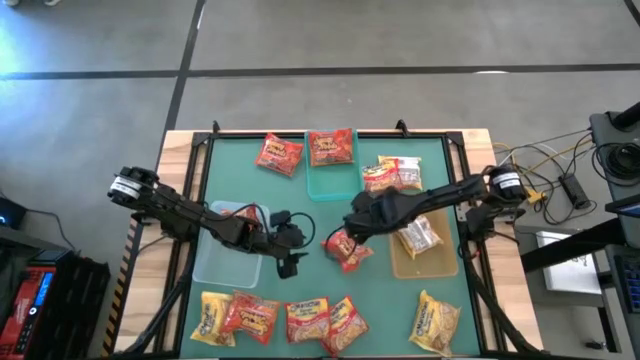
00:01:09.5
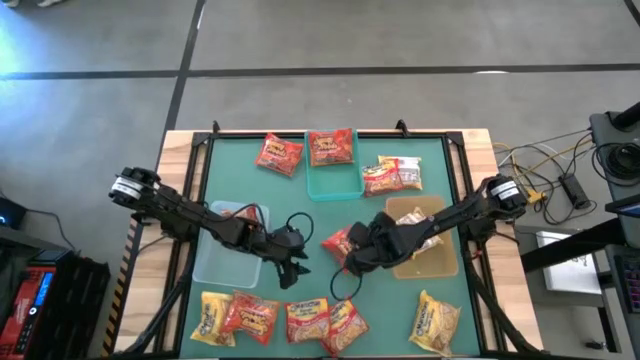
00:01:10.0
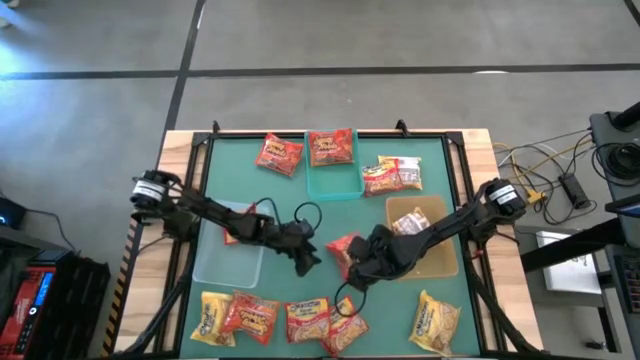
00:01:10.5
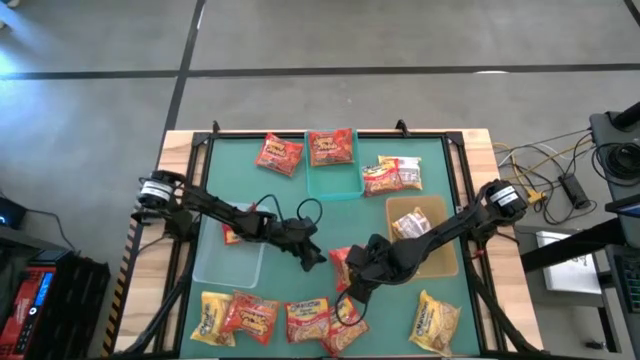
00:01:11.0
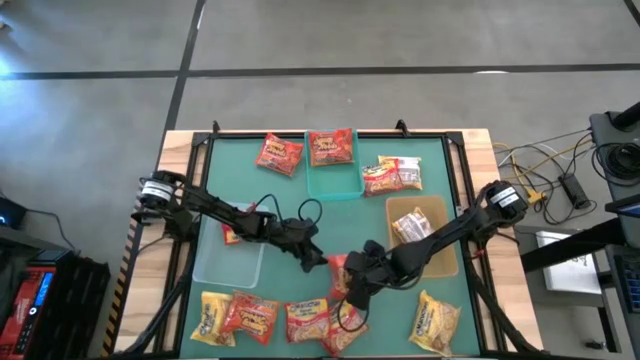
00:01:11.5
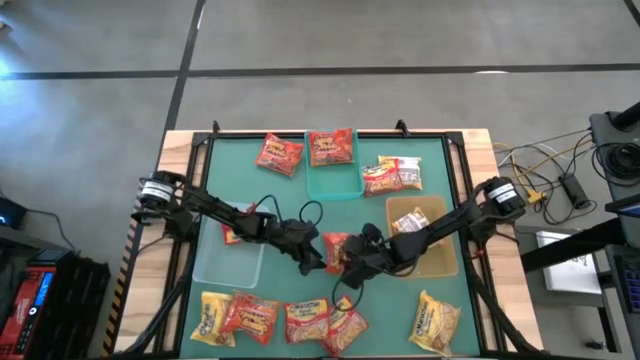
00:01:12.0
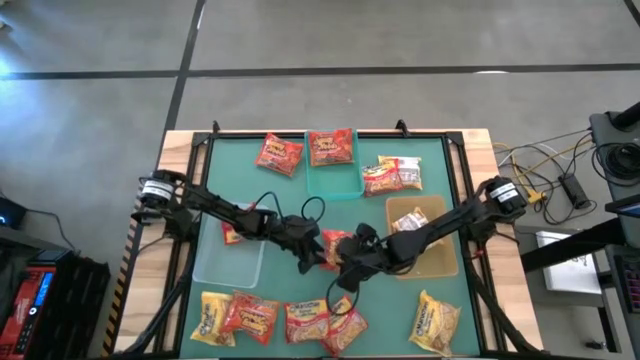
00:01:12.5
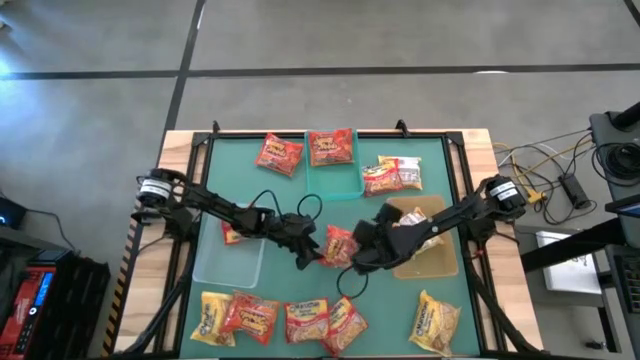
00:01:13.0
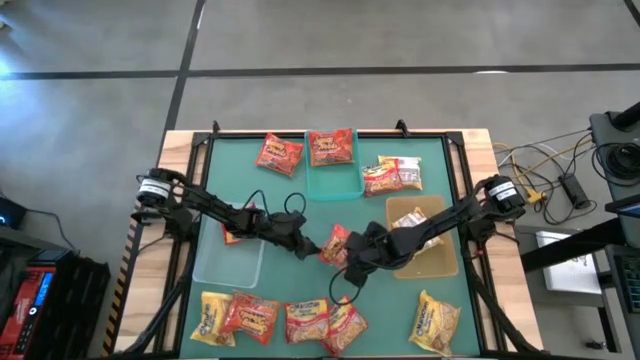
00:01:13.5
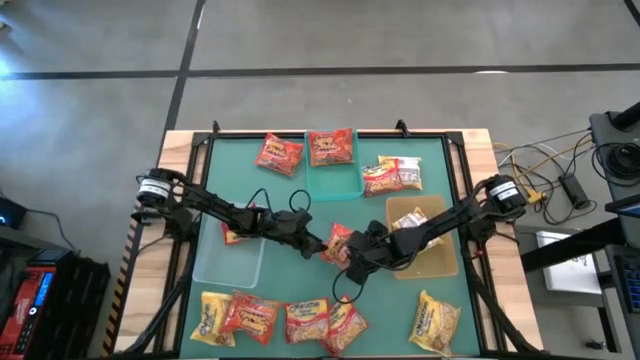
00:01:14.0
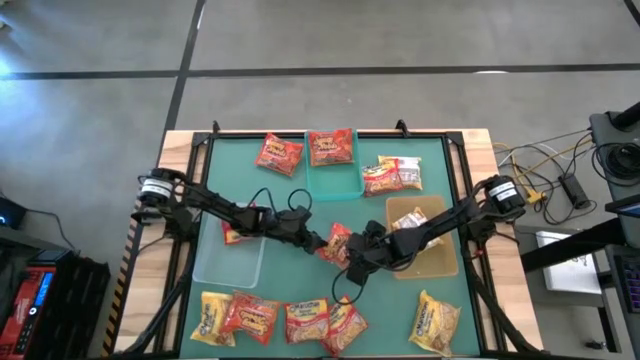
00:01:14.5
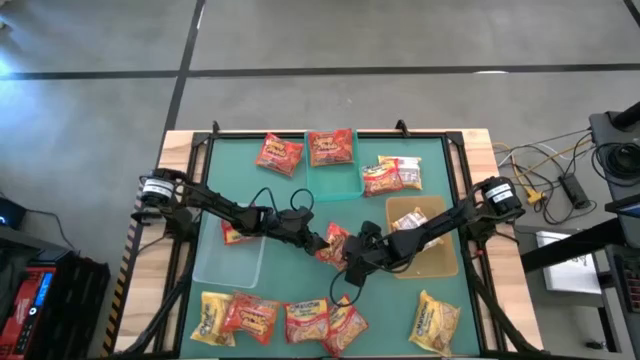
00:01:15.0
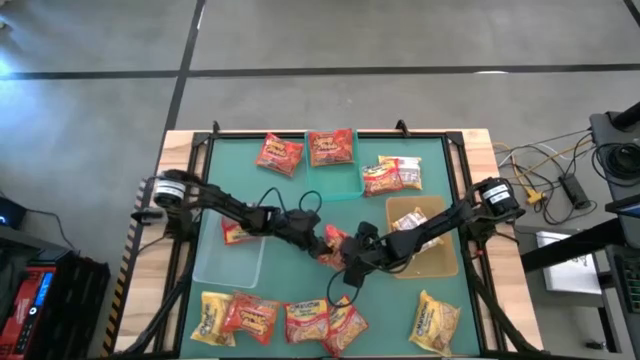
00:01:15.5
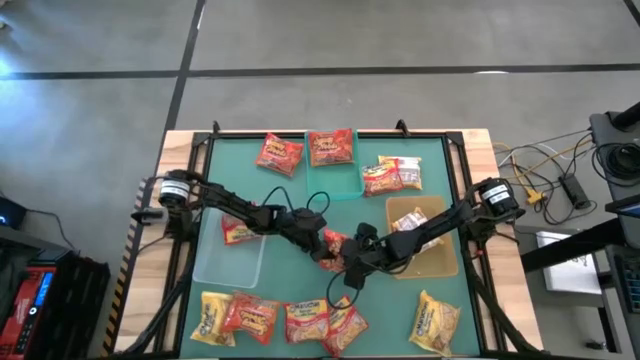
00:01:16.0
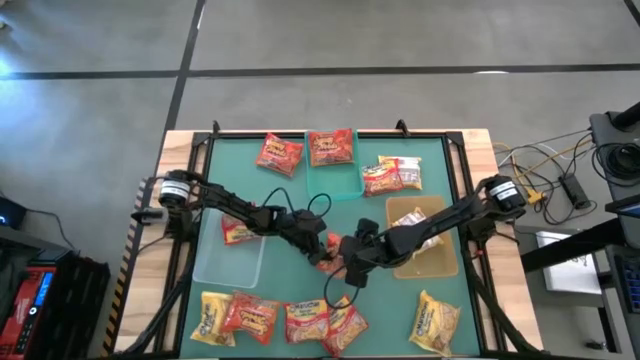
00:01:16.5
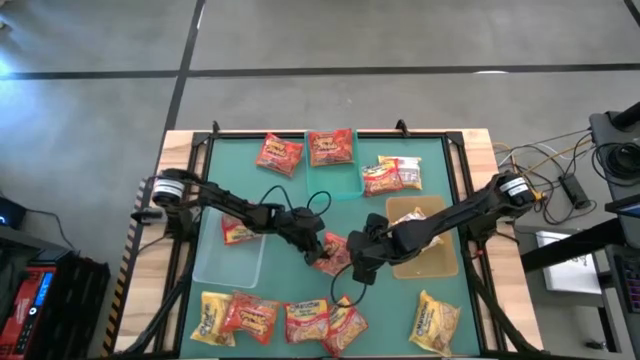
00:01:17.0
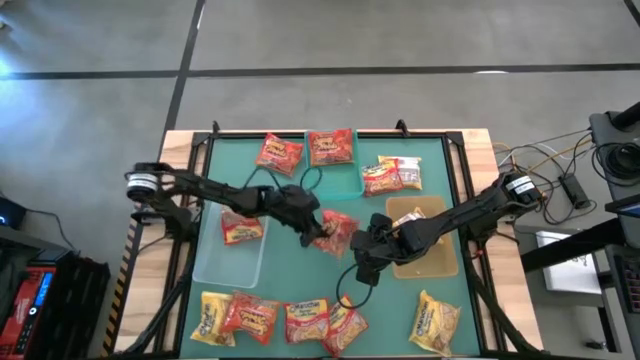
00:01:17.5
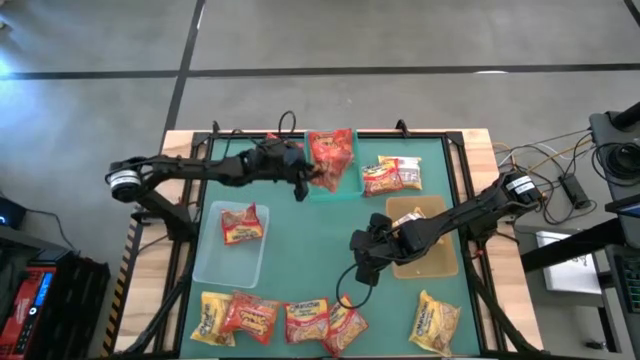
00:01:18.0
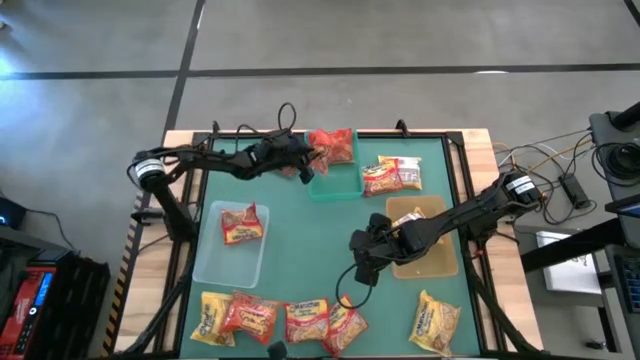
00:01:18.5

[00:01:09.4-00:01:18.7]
Task: Sort Maruchan noodles
Put the orange noodle pack into the blue bin

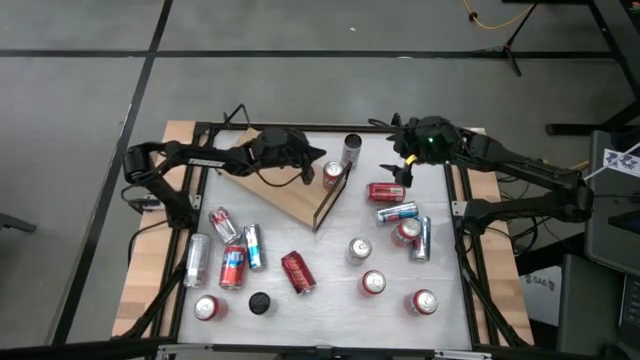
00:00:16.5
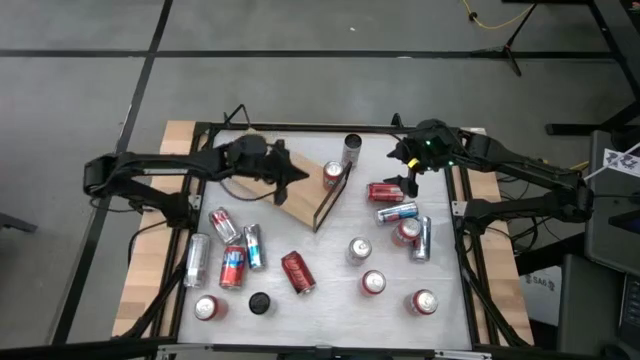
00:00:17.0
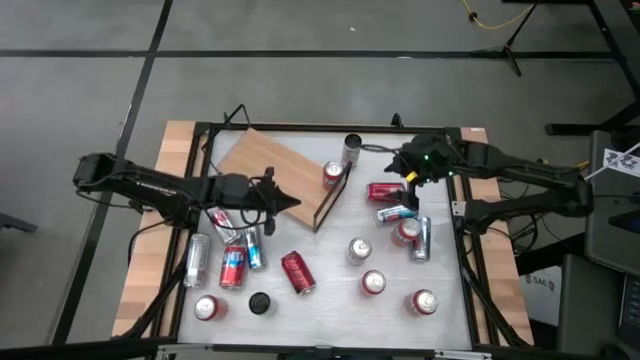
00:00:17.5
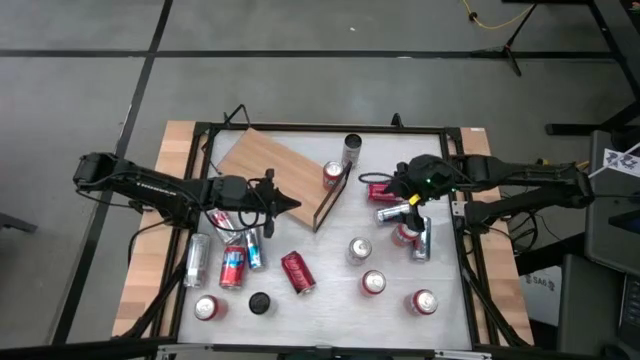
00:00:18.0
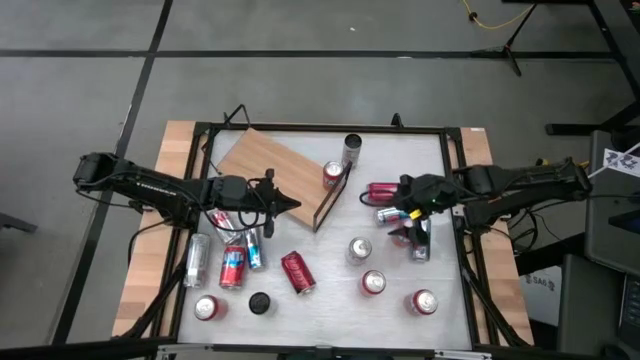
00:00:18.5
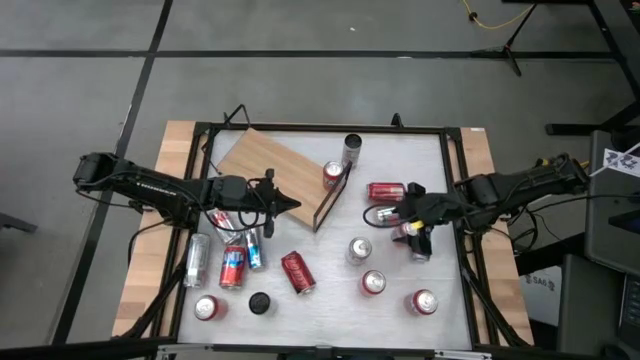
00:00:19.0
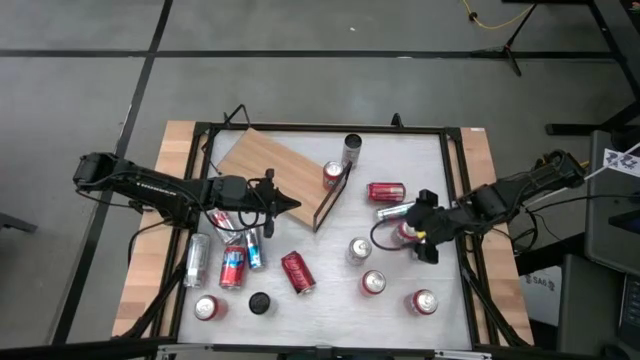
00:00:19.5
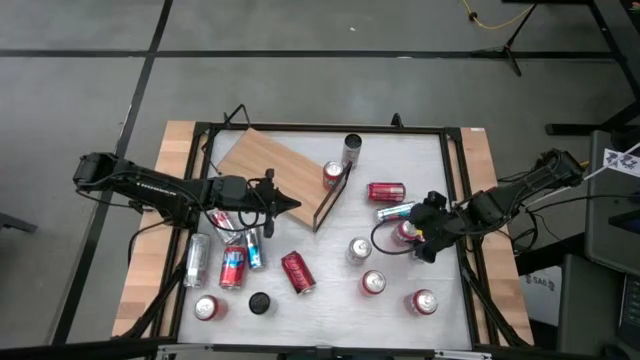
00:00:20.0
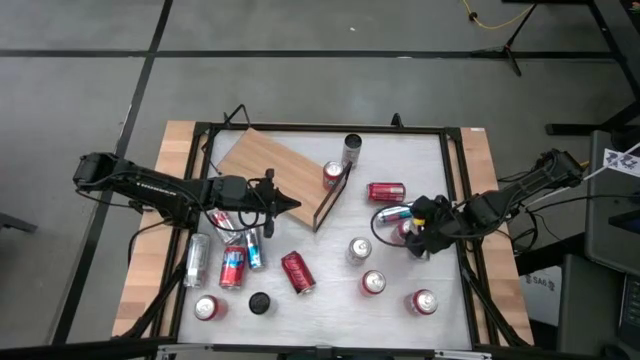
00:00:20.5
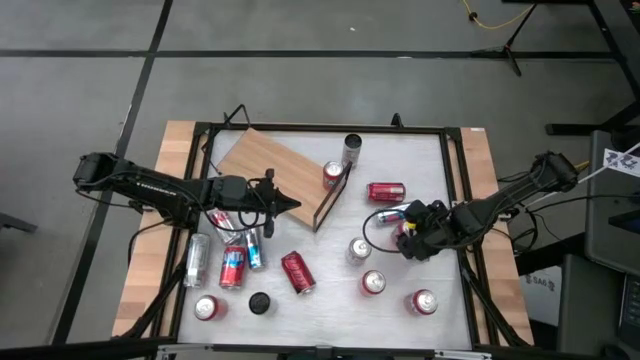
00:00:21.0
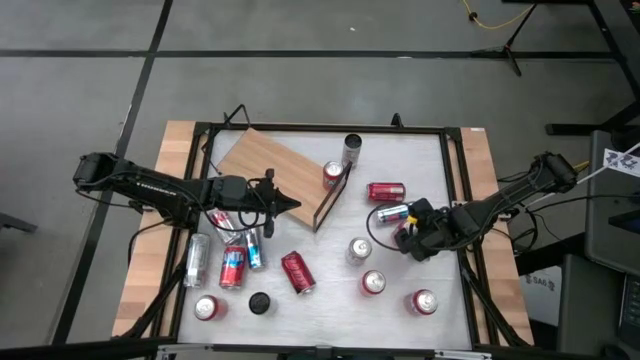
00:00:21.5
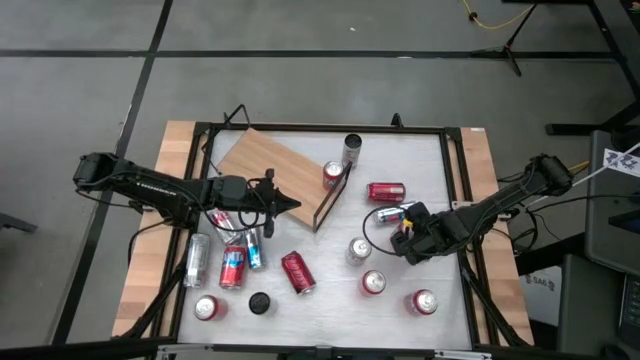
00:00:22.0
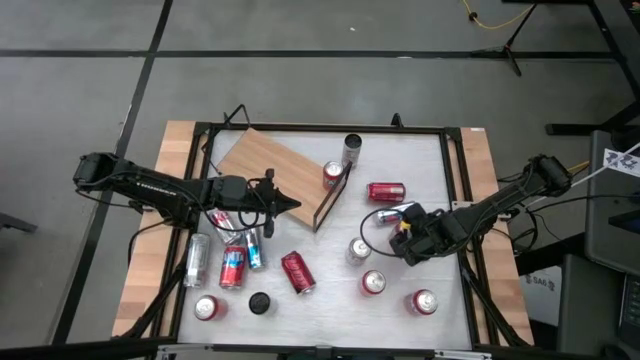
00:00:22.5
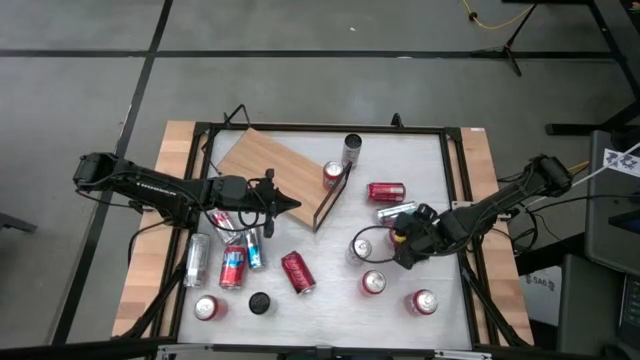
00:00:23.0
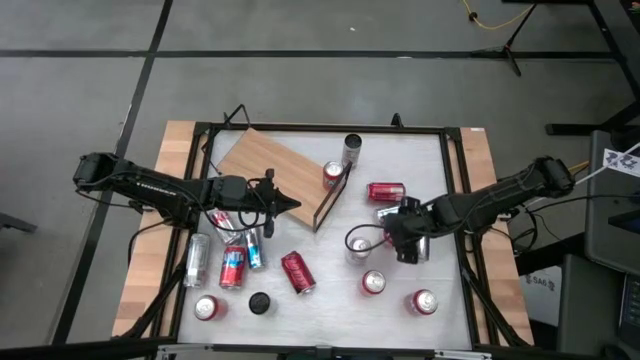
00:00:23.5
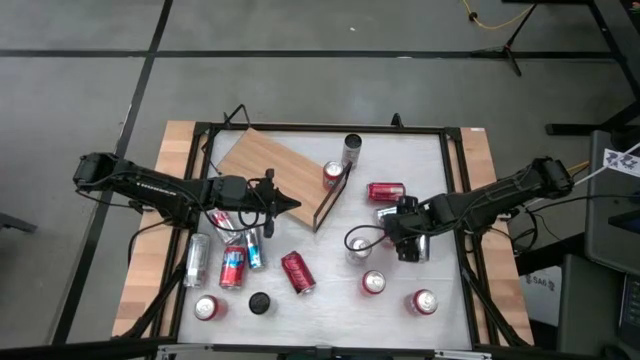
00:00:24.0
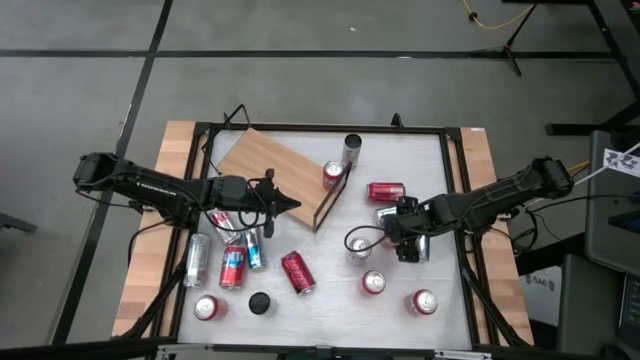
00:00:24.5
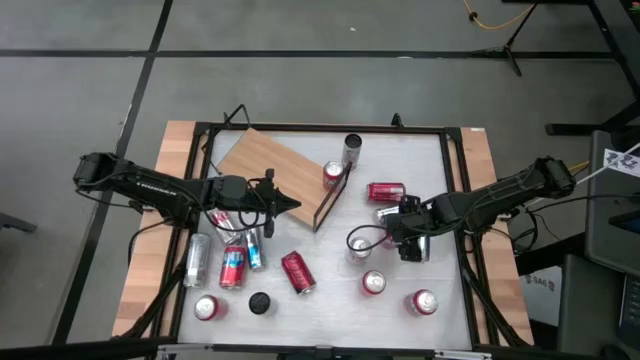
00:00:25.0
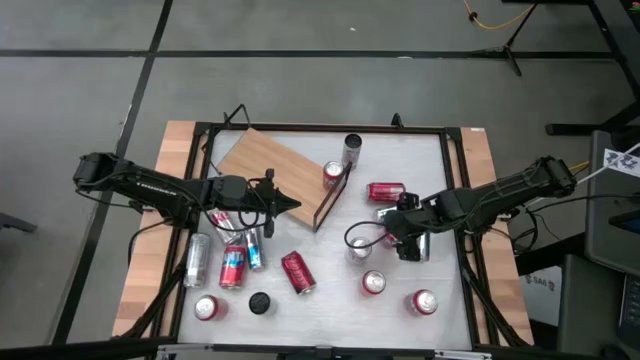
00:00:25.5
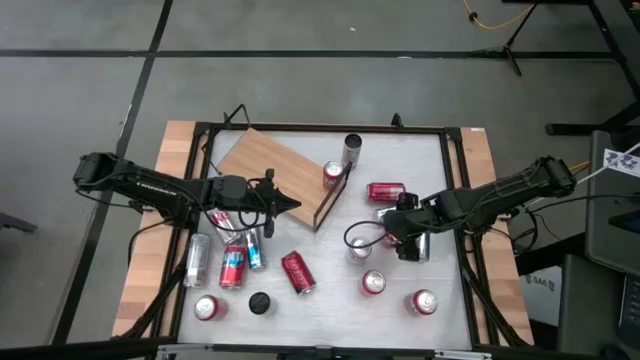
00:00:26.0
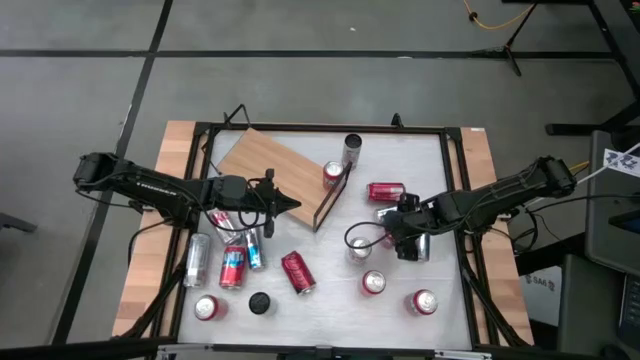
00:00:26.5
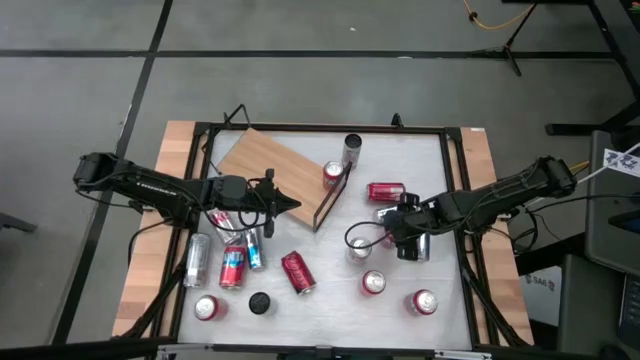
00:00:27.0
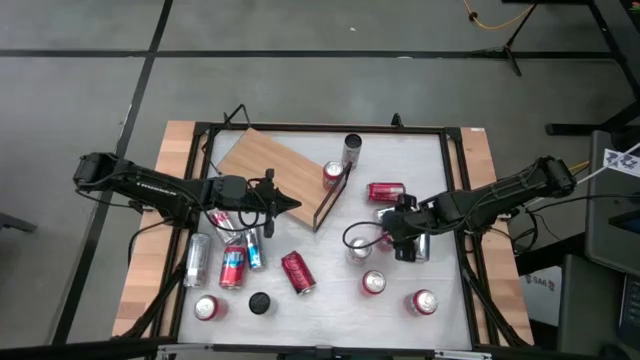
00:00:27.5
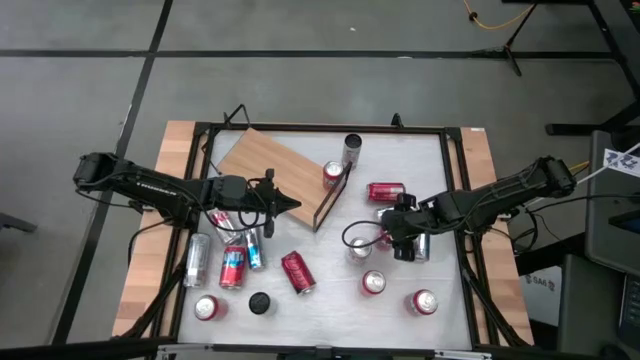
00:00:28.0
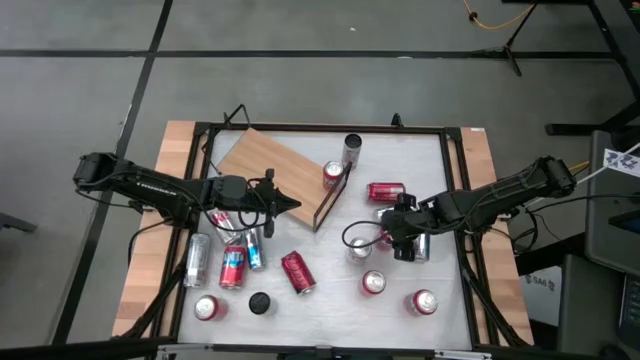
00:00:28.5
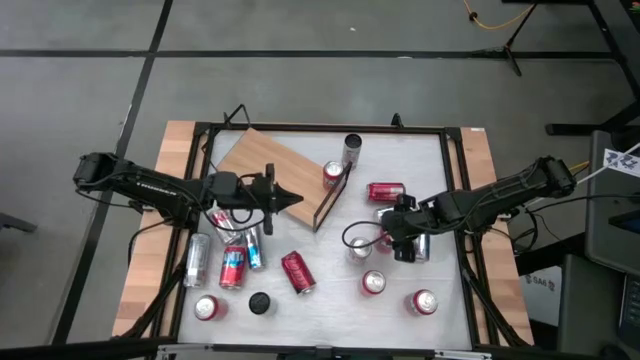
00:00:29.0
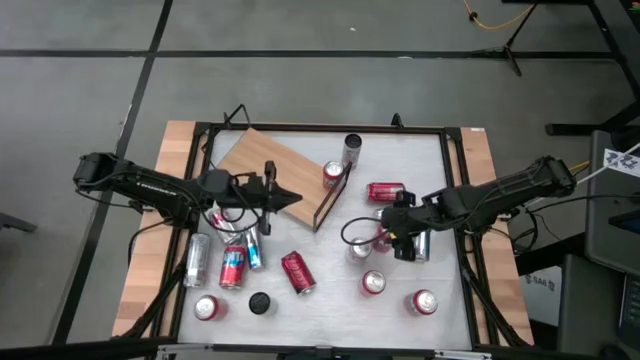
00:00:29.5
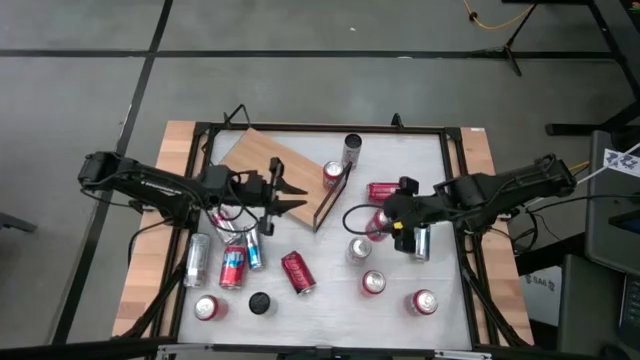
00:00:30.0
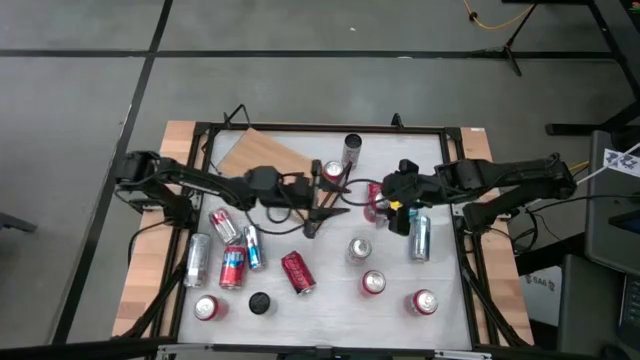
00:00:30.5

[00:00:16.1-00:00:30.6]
Task: Pick and place cans onto a shelf
Put the middle right red soda can on the shelf aligned with the other red soda can
